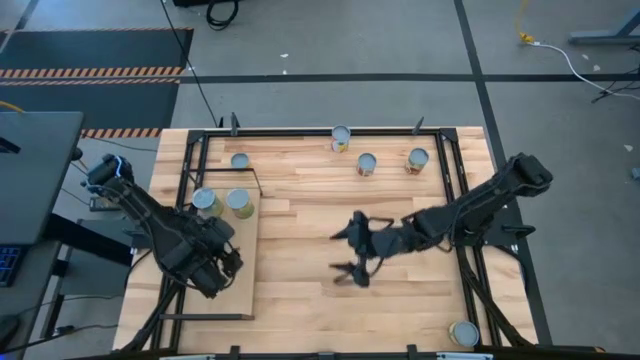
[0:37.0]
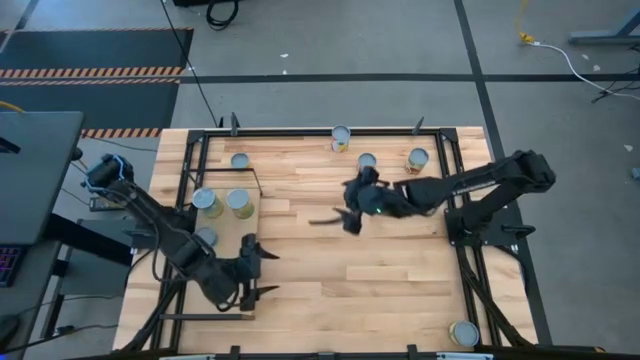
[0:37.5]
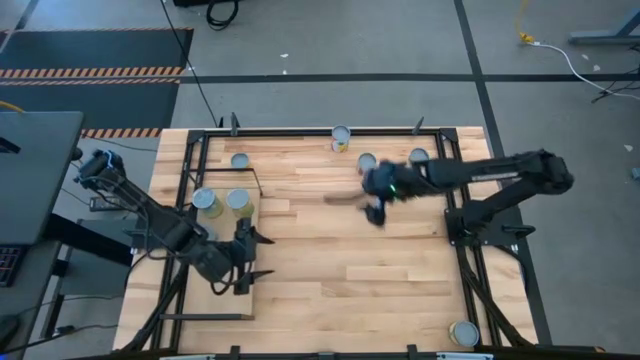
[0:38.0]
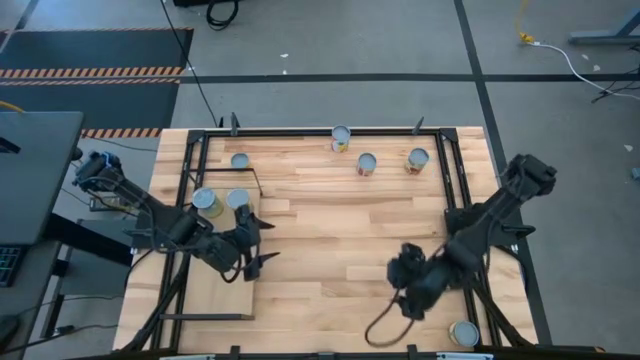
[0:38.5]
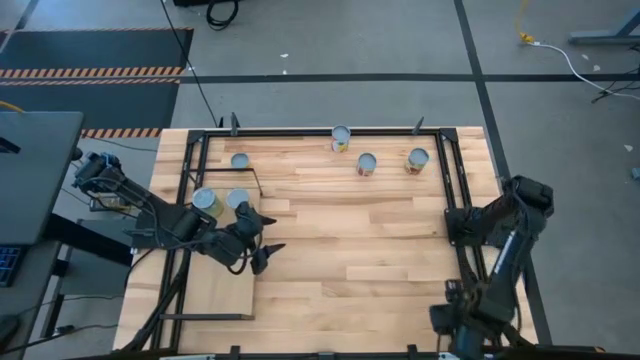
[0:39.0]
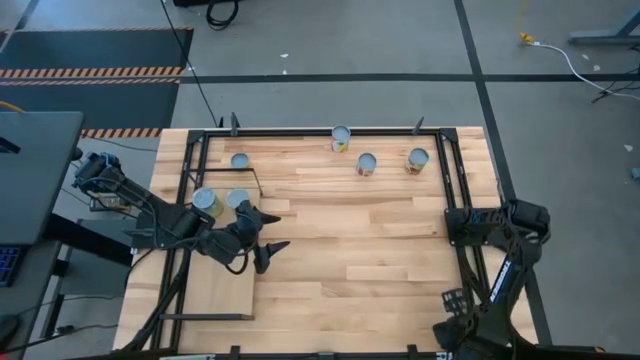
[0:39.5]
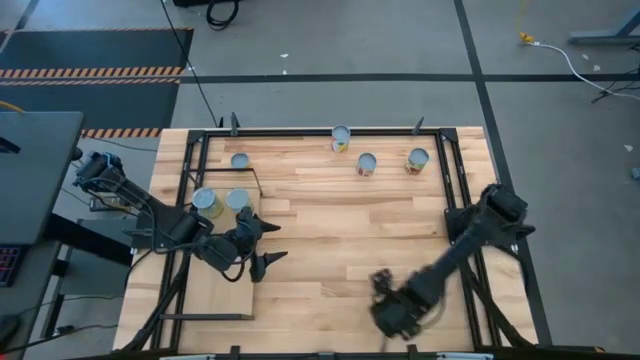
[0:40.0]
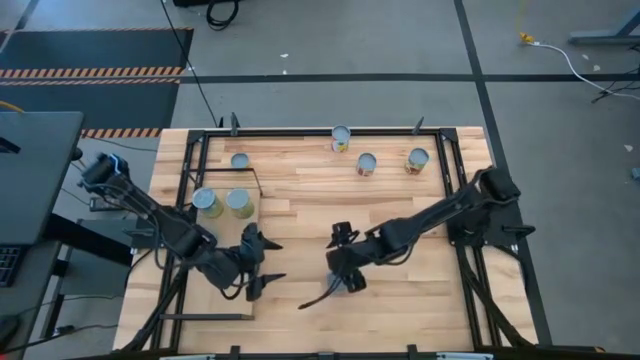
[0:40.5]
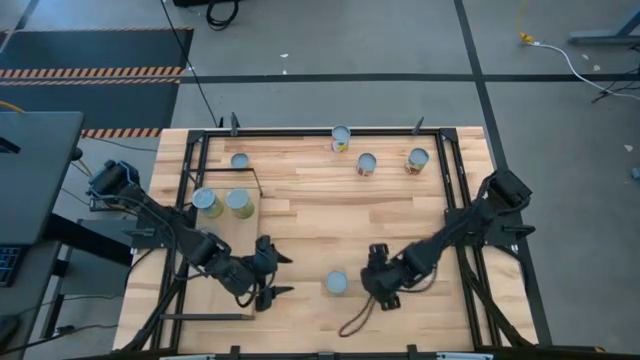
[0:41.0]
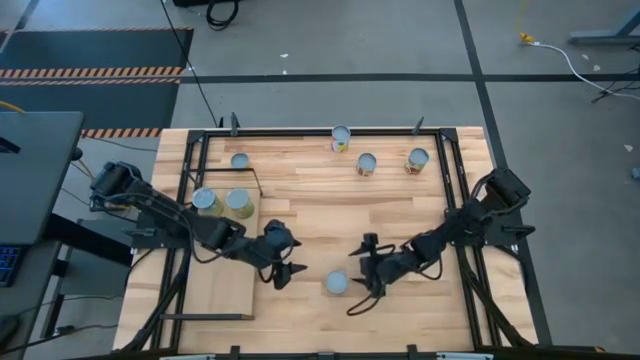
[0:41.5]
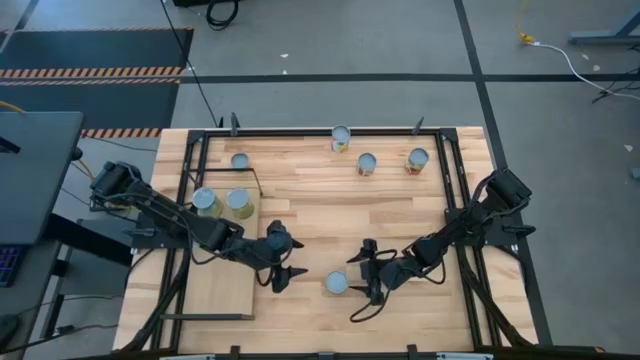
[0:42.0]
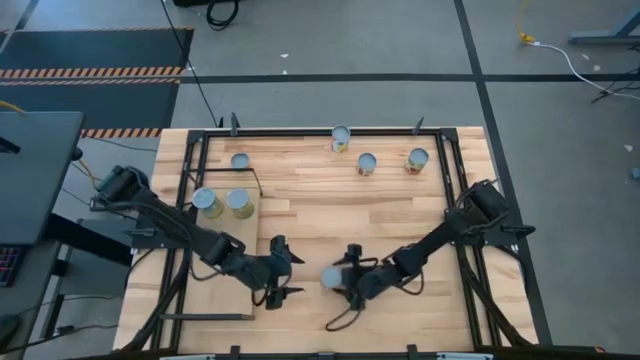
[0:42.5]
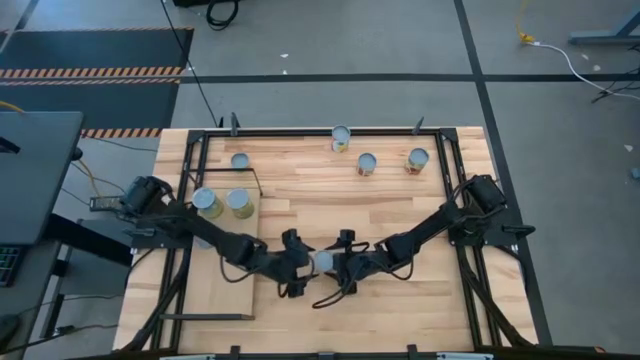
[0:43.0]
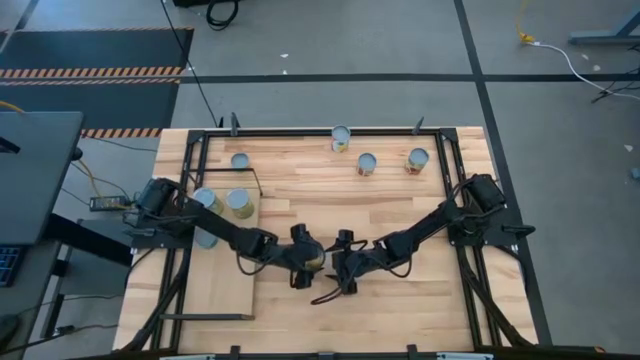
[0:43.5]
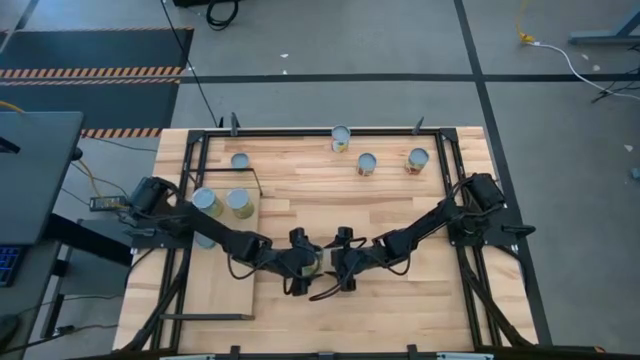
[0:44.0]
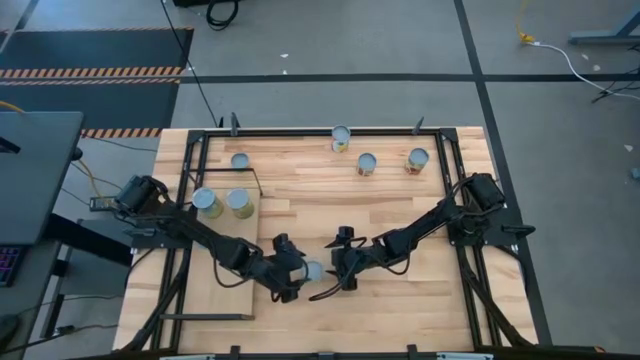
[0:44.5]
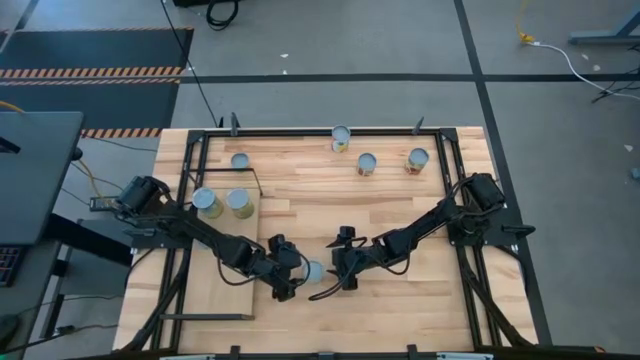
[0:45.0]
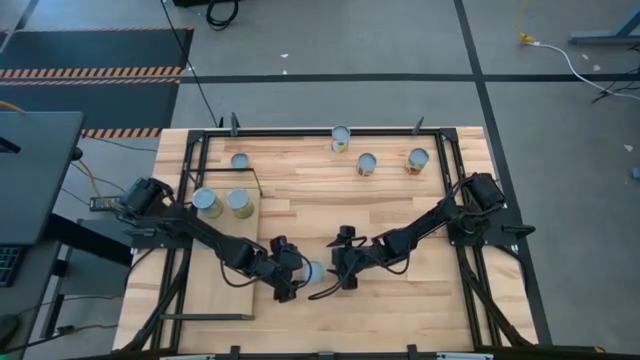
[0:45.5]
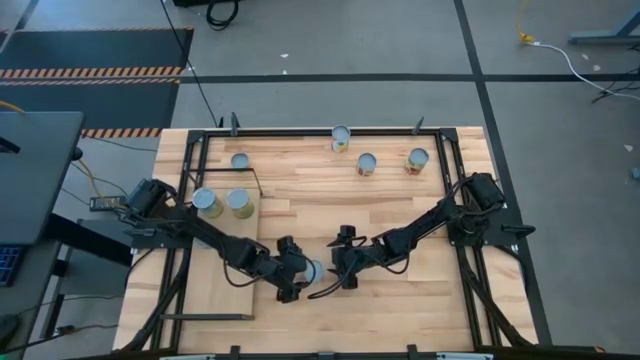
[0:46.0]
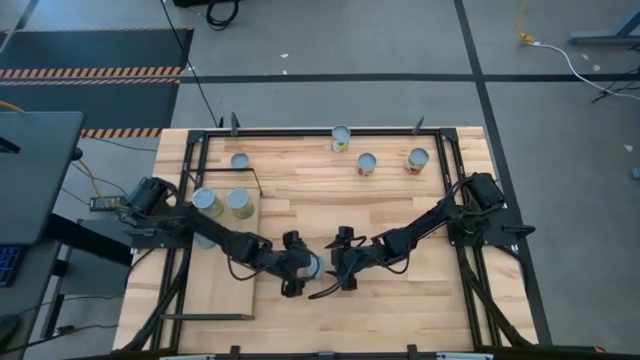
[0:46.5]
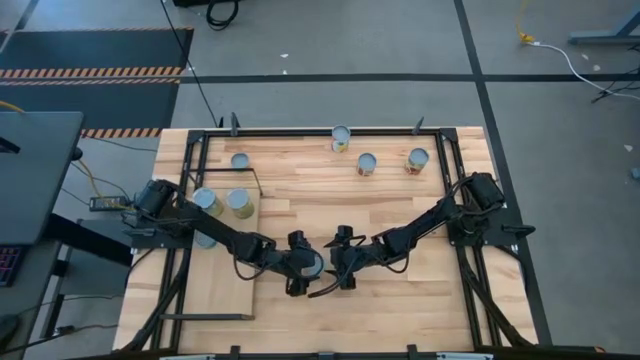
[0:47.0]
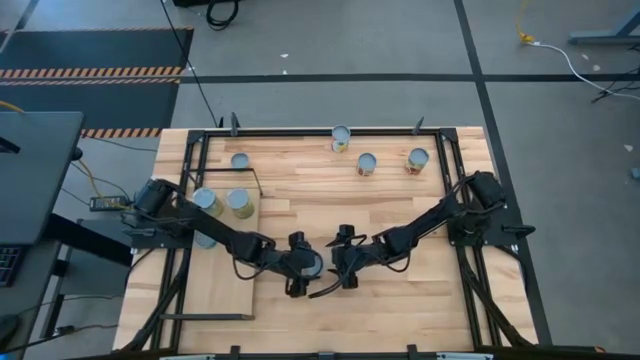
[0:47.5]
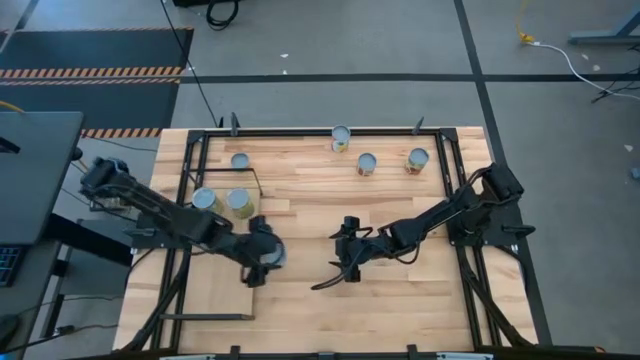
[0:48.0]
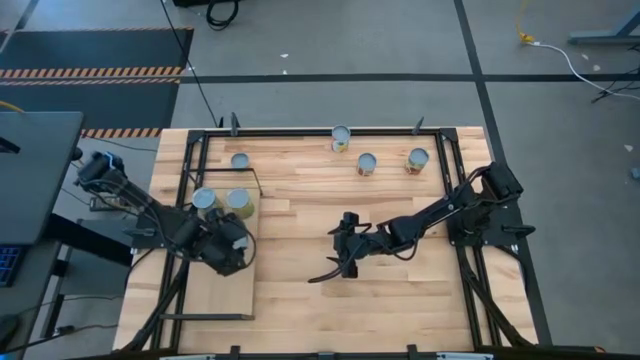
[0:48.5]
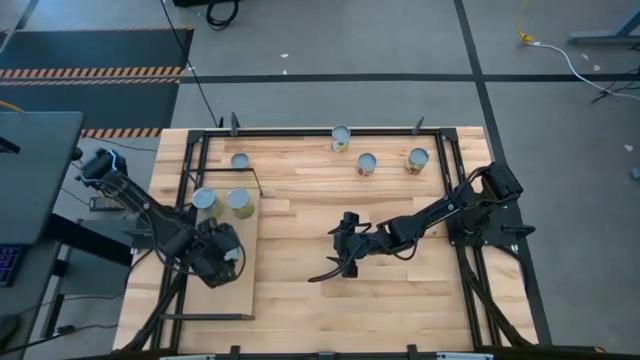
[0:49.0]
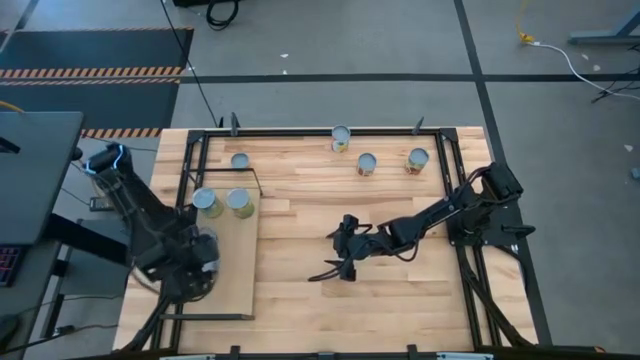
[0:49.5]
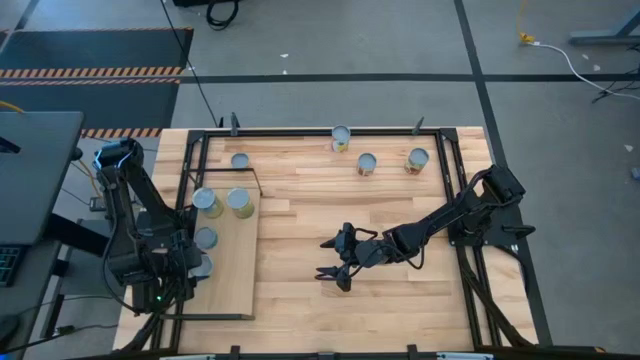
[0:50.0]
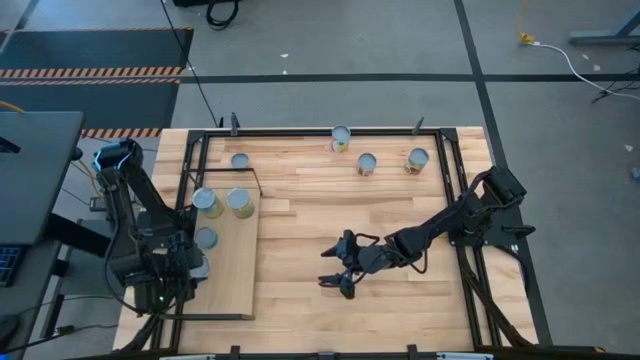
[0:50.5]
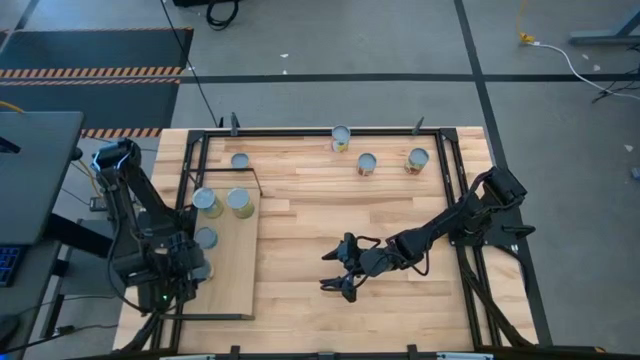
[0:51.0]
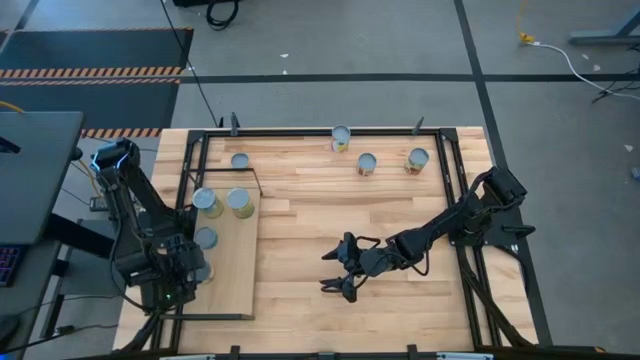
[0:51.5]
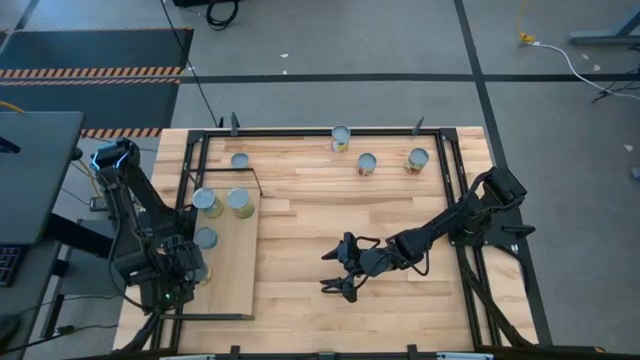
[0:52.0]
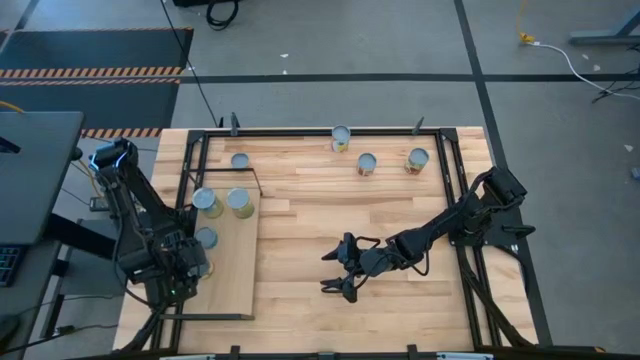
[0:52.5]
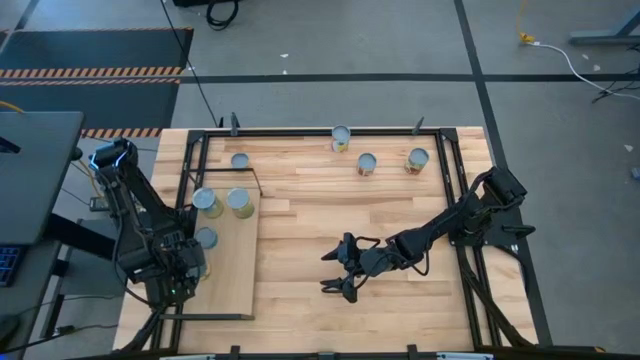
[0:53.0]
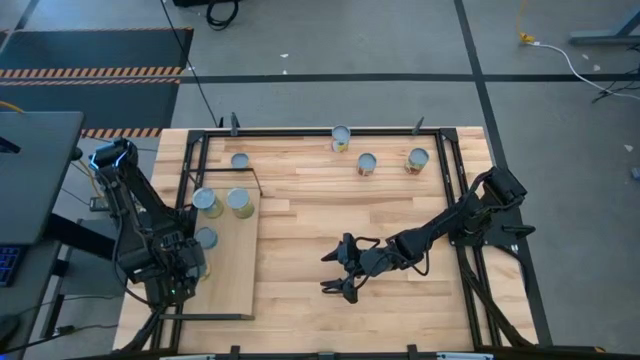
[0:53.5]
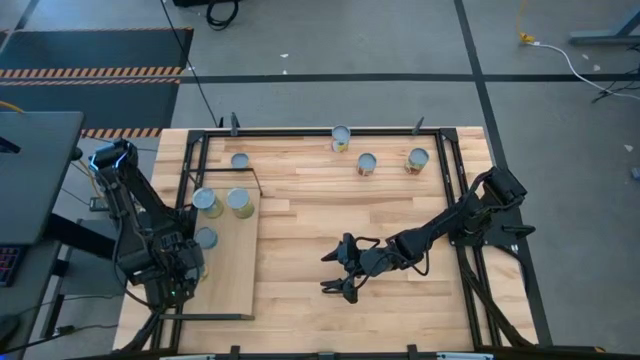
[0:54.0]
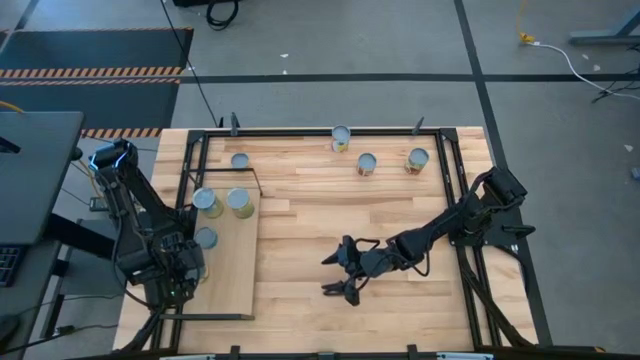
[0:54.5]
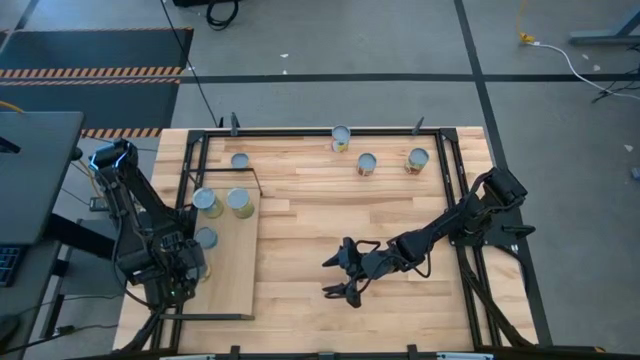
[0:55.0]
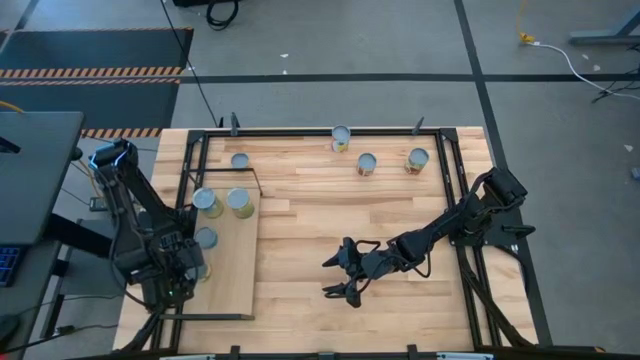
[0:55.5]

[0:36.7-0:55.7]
Task: Pick and place cans onto a shelf
Put the canned peaches on the shelf

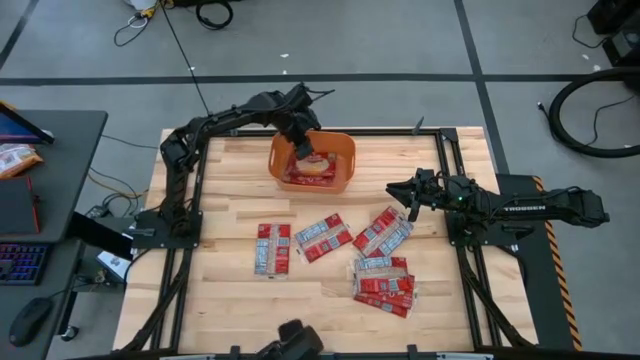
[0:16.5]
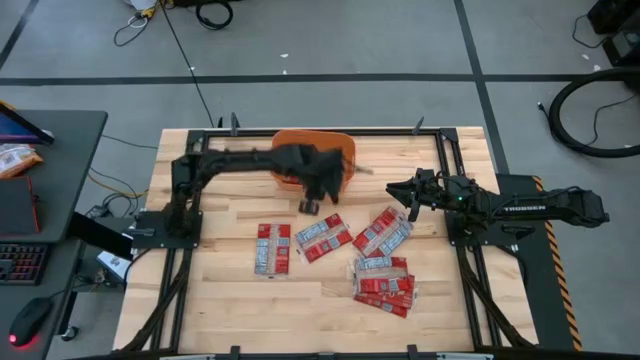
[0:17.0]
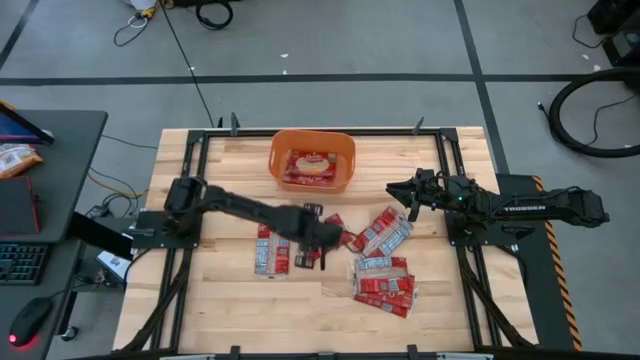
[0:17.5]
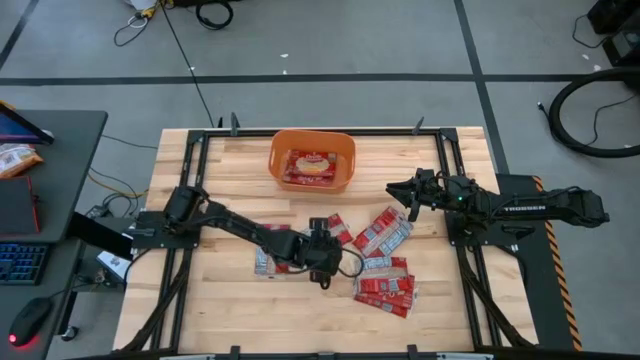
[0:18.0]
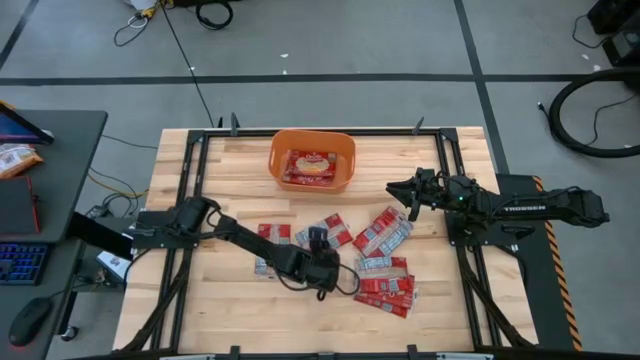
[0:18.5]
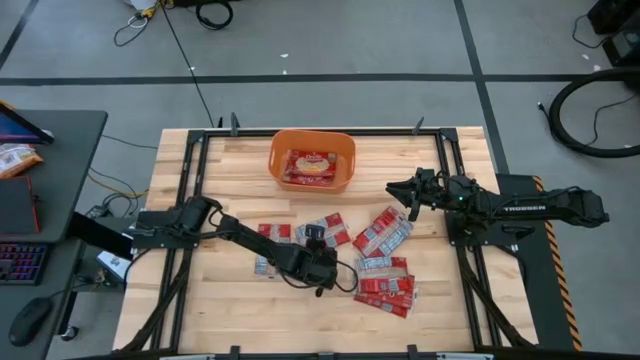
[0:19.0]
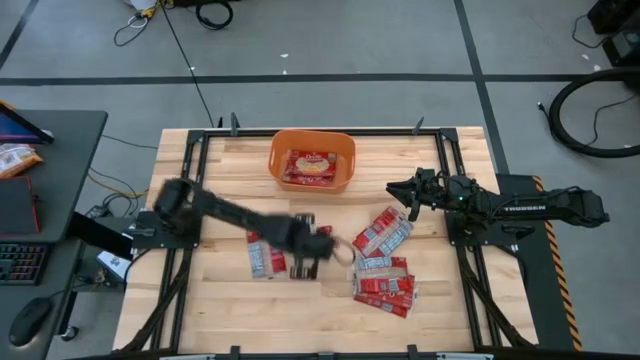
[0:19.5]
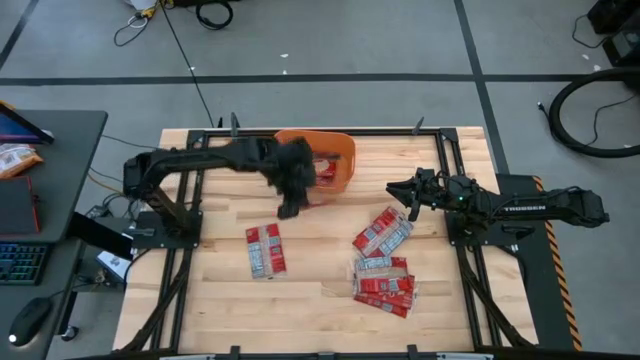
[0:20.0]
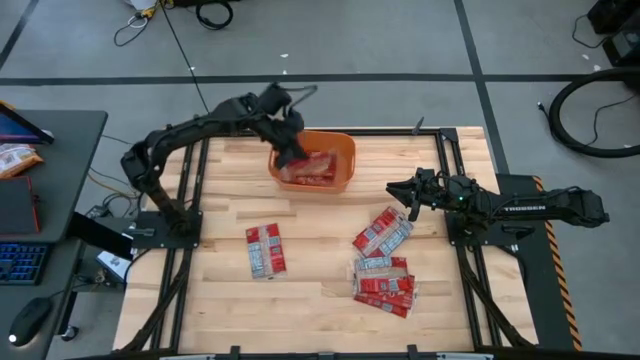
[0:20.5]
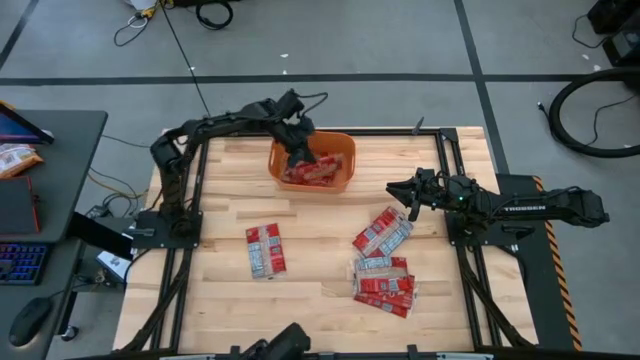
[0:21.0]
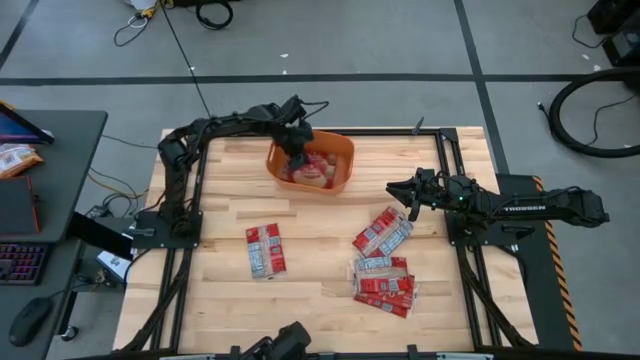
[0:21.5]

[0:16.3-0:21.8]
Task: Sort popcorn bags into baskets
Put the red popcorn bag into the orange bin
